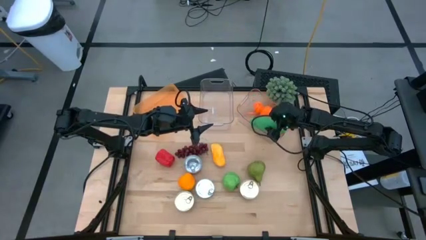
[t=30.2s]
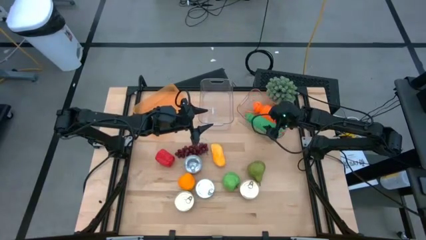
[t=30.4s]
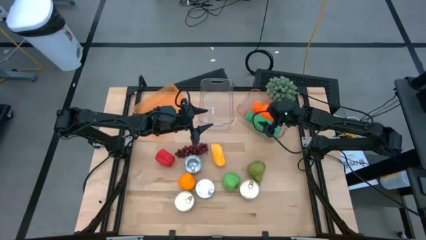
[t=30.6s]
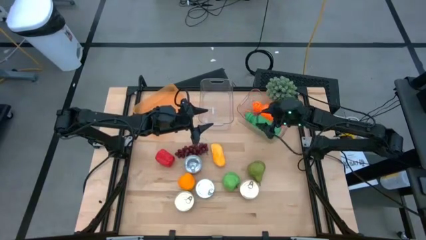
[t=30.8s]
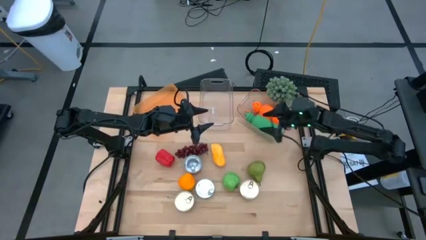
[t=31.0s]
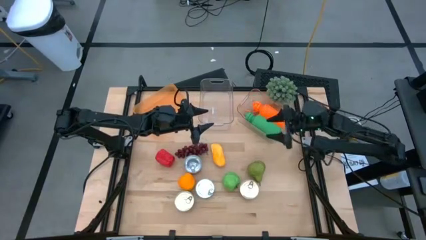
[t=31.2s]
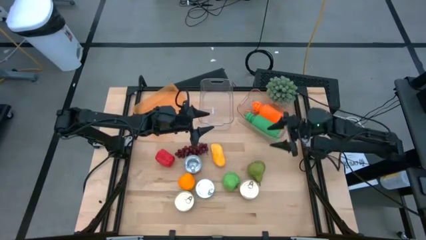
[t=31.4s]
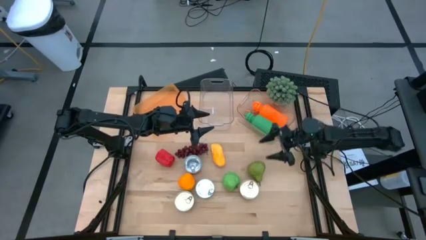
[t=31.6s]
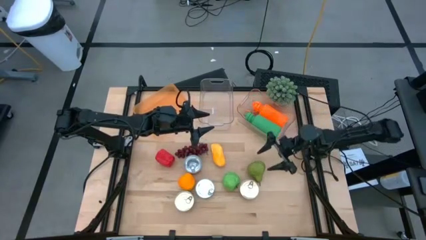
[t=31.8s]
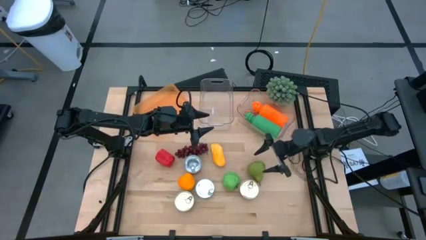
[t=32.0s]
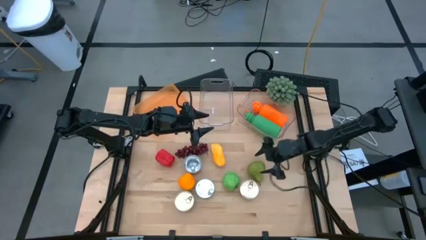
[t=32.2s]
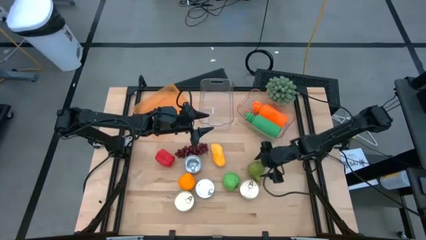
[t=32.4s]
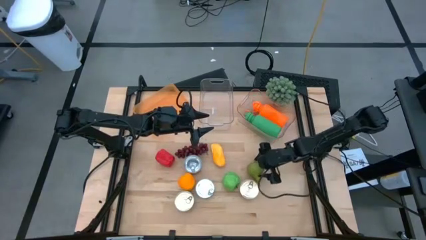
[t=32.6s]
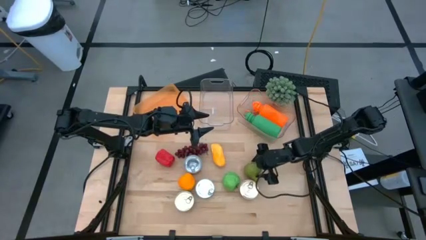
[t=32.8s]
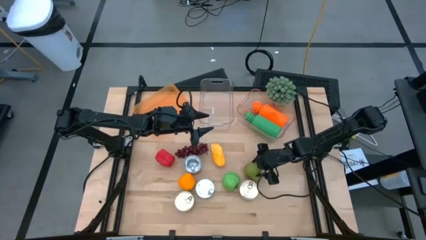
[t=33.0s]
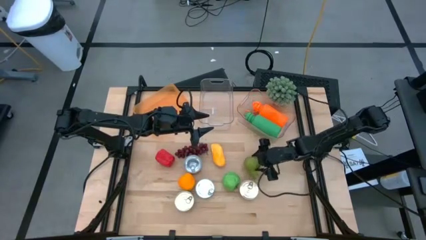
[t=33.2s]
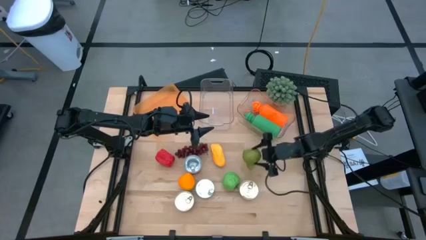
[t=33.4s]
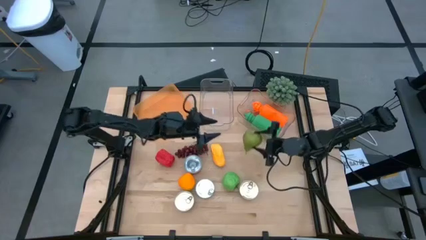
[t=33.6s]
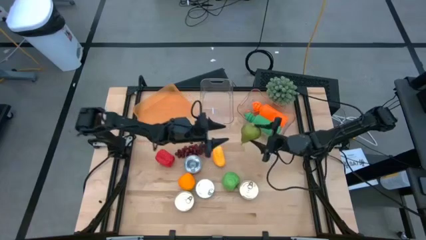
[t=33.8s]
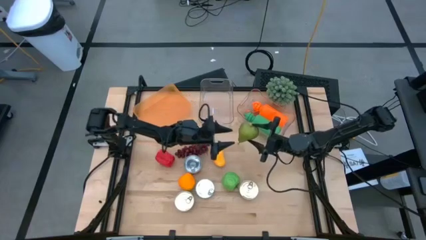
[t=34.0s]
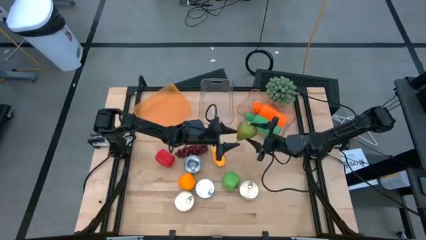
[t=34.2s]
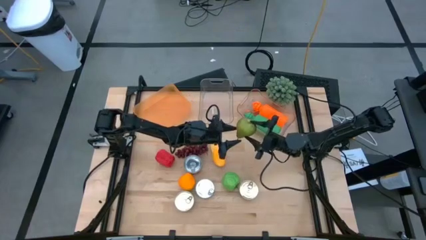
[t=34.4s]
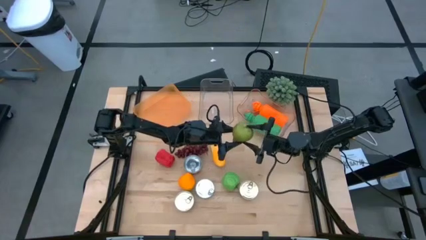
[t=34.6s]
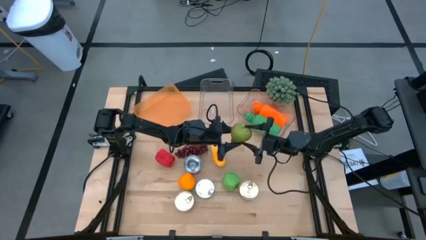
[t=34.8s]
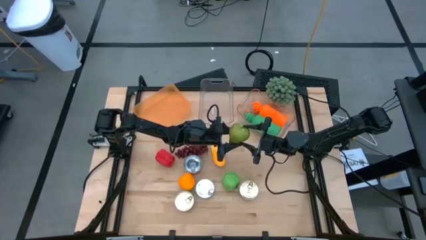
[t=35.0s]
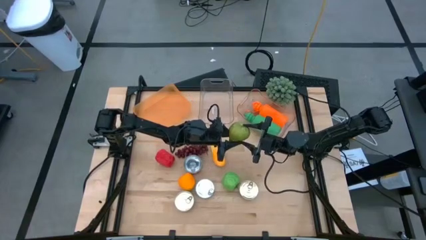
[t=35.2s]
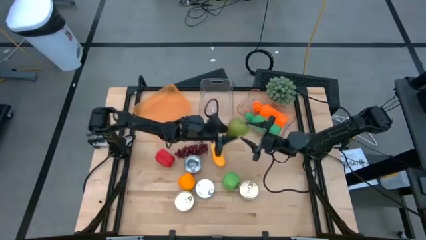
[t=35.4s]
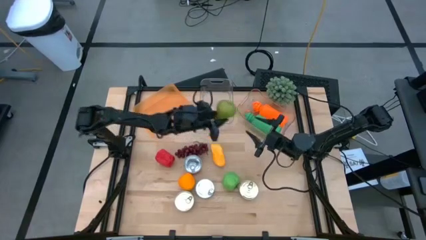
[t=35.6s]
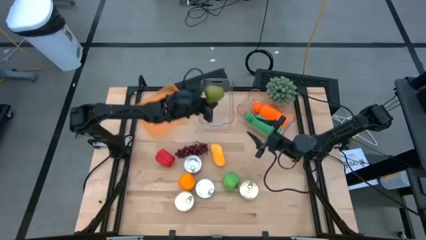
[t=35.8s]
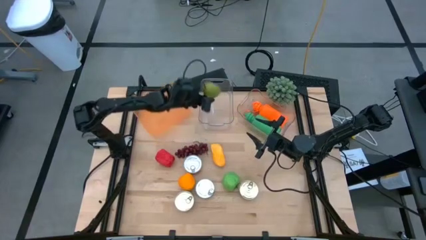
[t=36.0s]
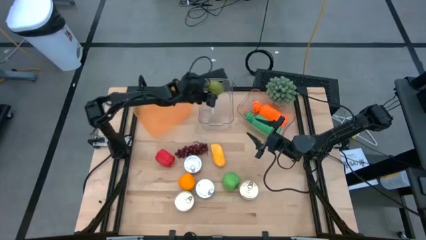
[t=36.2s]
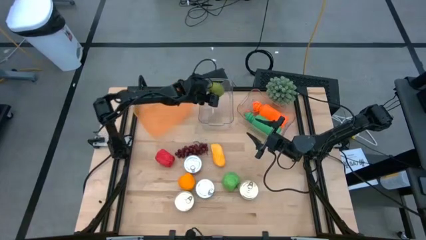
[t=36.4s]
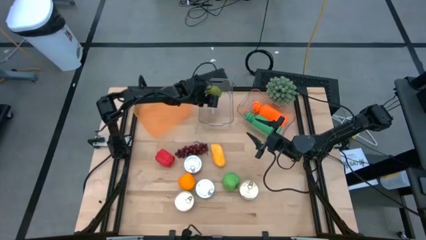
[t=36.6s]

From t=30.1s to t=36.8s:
Task: Pick & Place Food Item
Put the pear into the left transparent bin

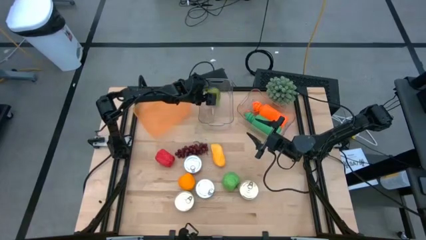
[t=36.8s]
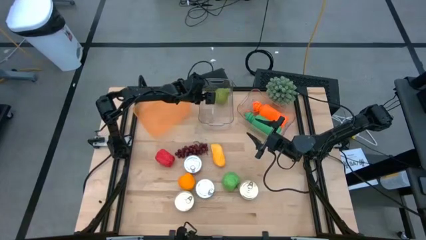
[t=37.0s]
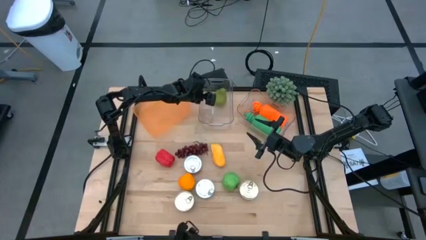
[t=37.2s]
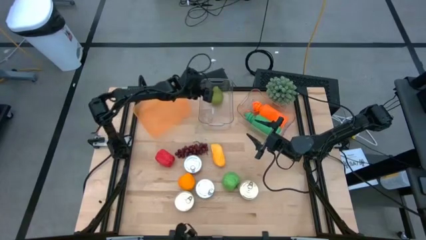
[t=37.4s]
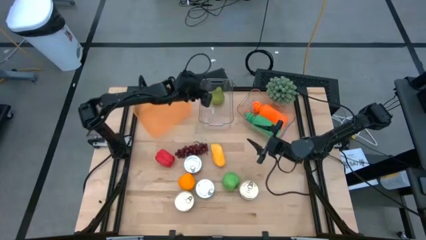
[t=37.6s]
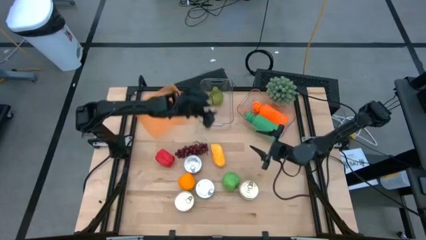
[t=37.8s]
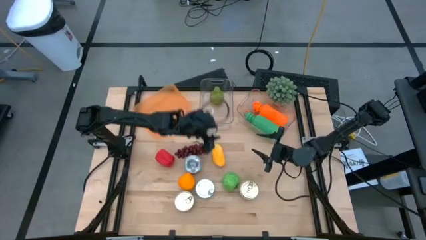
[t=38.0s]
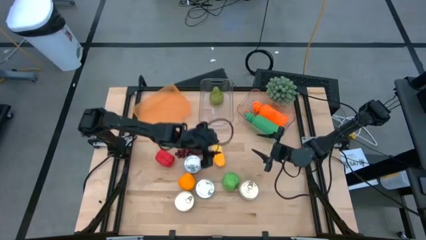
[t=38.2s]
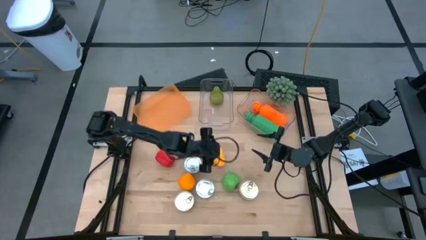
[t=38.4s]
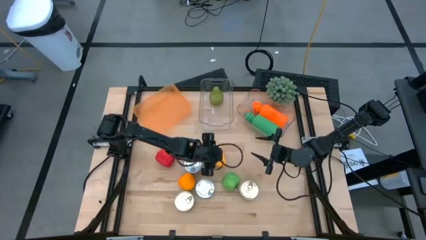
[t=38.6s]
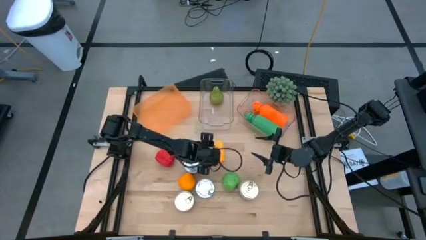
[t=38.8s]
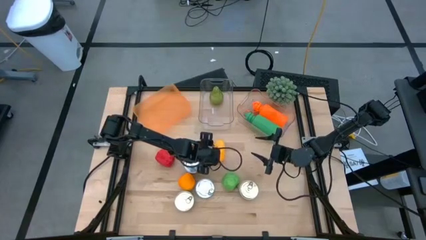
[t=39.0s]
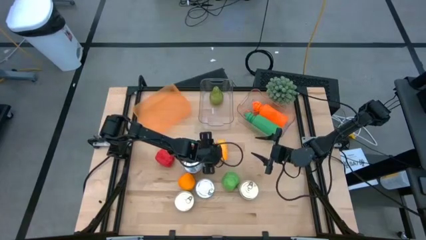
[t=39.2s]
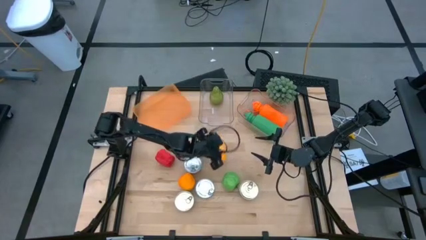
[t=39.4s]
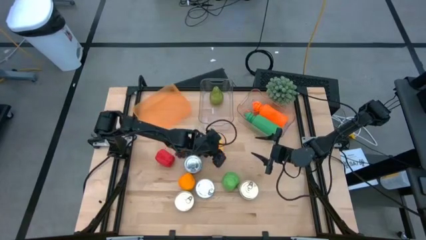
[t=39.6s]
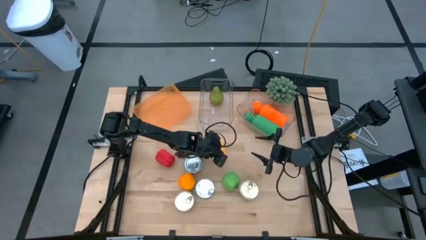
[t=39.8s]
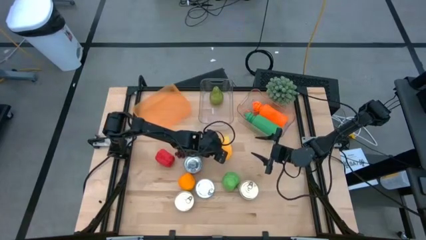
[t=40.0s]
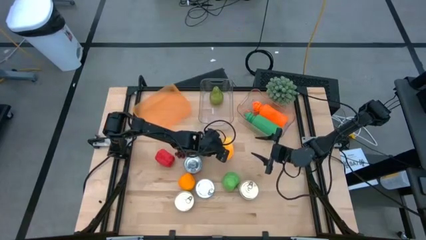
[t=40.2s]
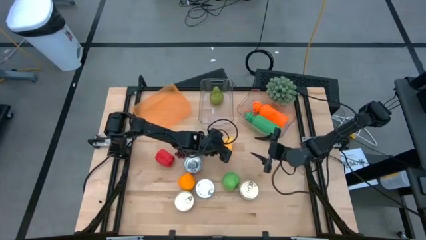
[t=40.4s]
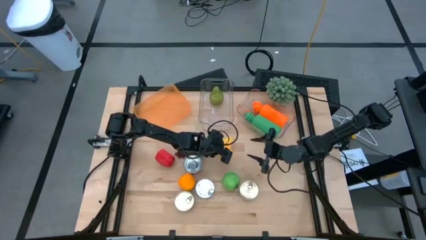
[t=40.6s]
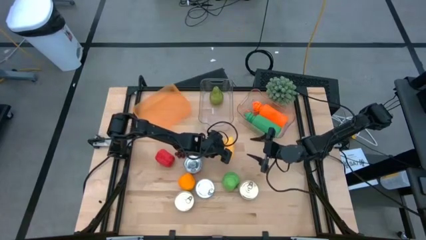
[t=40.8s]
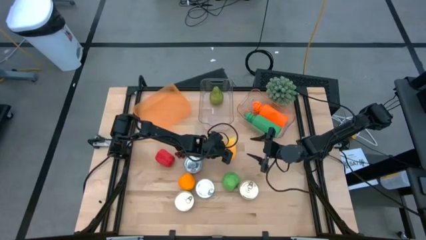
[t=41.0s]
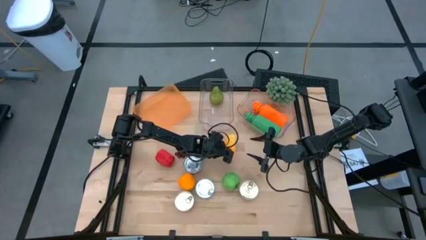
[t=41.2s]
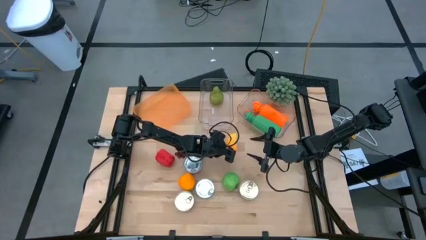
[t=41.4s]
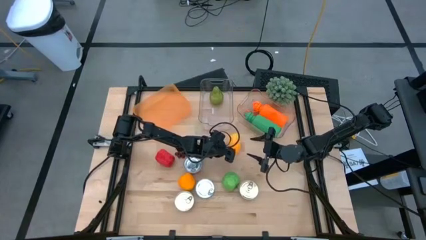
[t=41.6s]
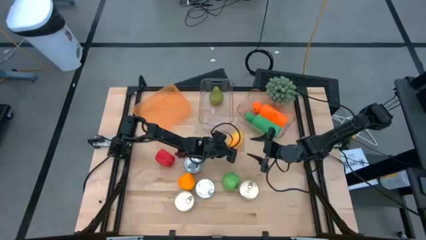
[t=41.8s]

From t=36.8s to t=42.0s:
Put the mango into the left transparent bin

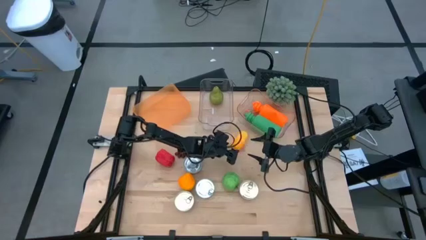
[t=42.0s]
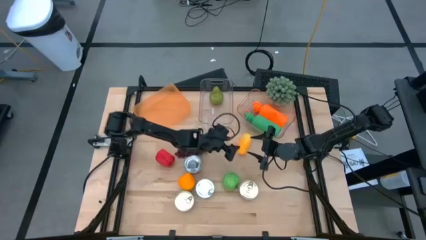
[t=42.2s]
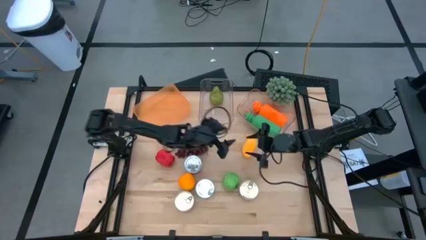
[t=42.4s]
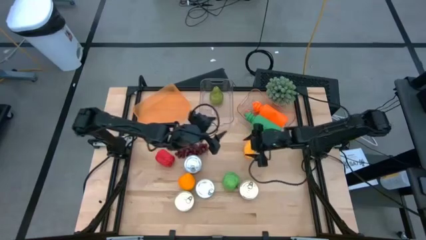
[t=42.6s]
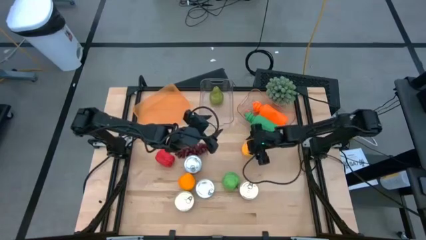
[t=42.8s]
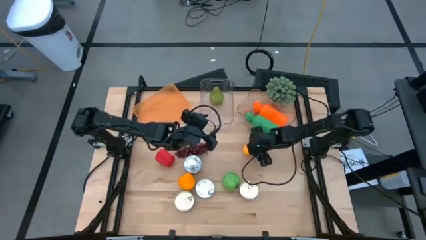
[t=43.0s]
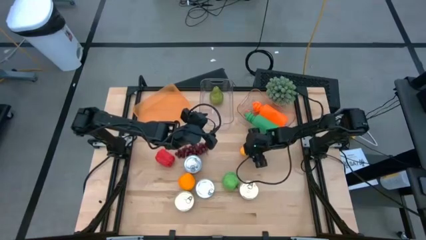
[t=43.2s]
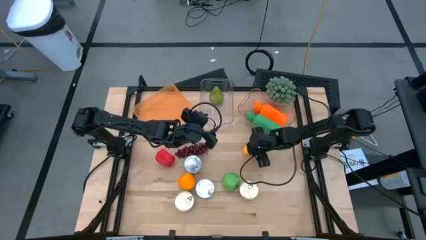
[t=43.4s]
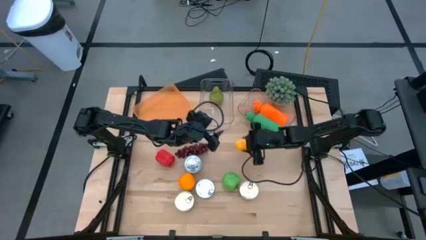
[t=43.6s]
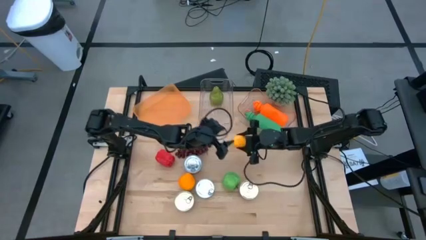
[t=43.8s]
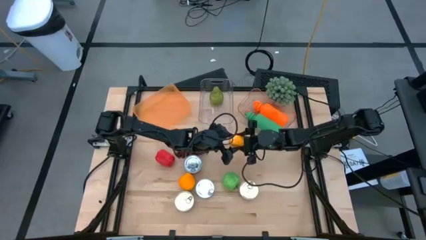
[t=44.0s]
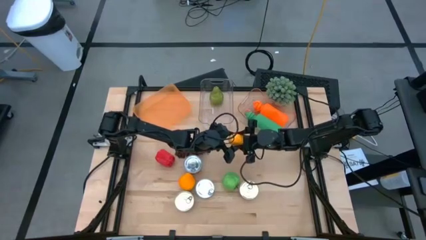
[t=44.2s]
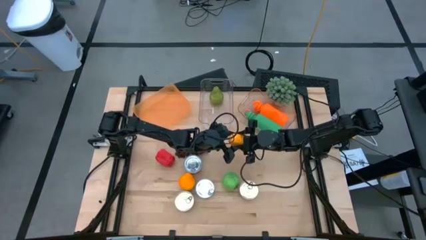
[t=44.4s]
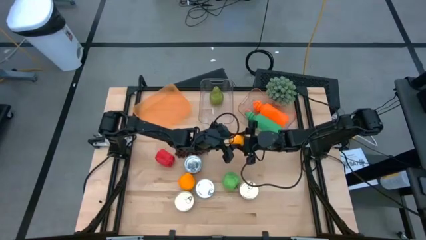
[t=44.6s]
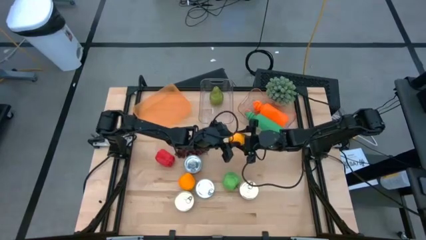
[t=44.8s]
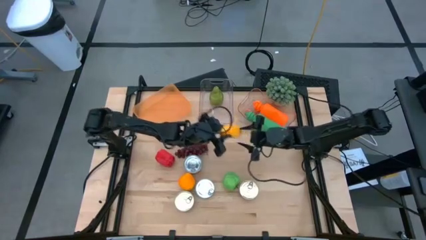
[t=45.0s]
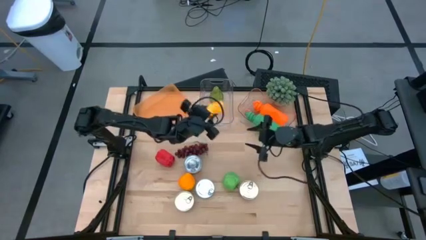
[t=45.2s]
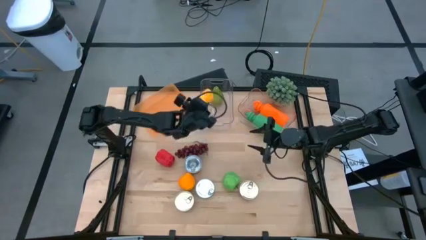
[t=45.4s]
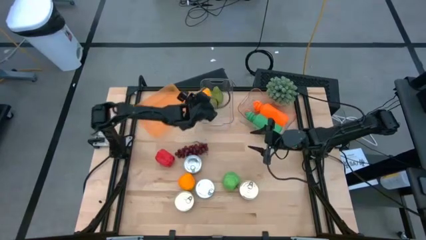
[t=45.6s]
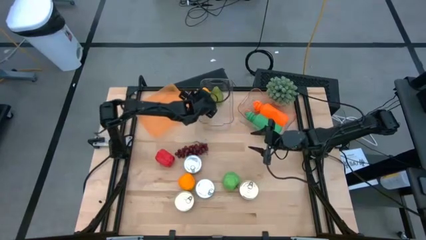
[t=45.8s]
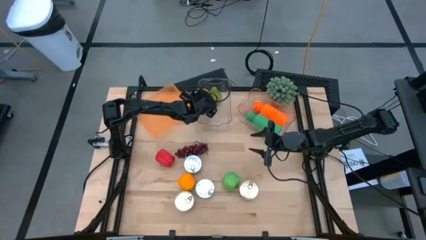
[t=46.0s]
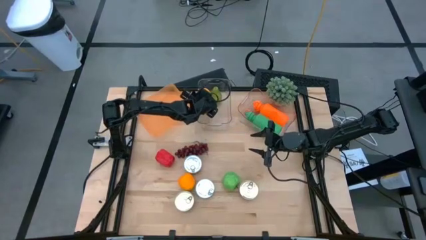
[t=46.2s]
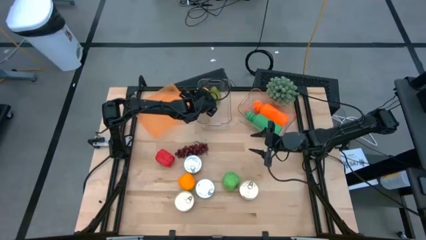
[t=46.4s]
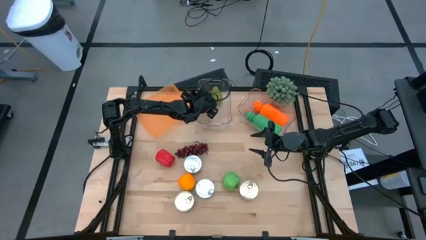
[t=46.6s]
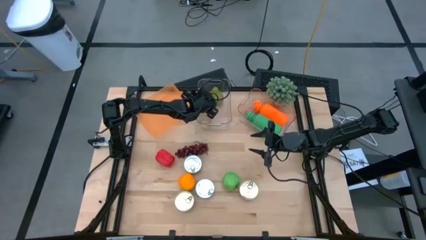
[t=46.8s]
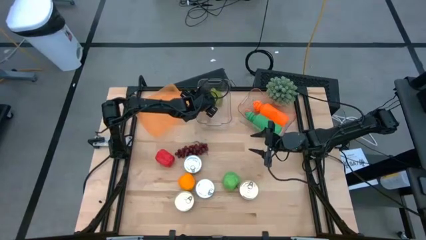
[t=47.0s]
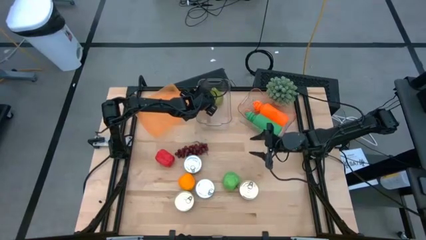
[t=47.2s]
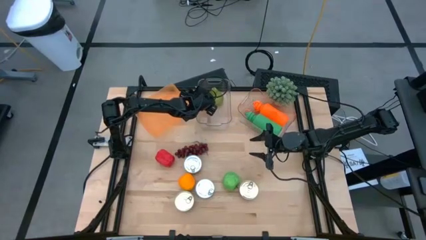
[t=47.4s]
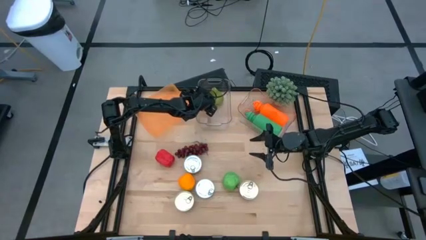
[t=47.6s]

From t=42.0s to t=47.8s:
Put the mango into the left transparent bin
